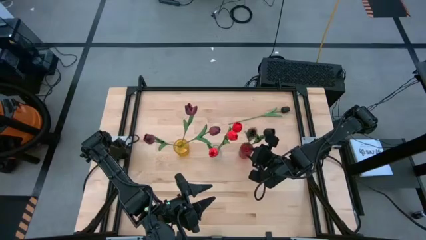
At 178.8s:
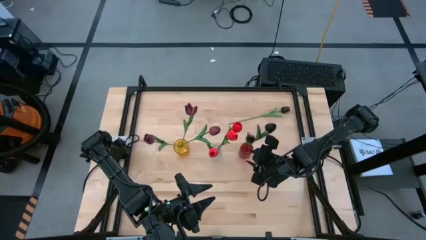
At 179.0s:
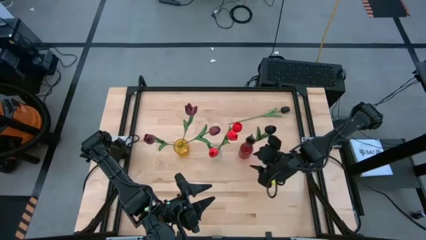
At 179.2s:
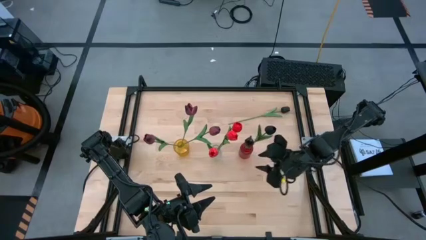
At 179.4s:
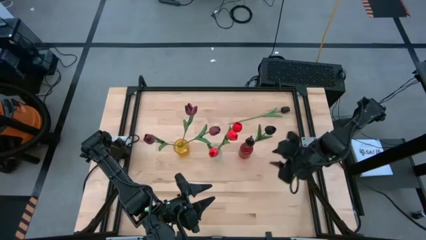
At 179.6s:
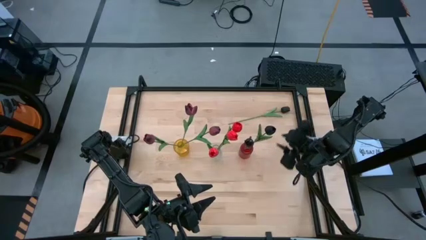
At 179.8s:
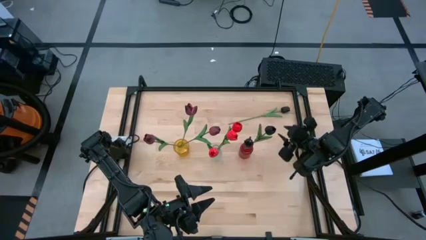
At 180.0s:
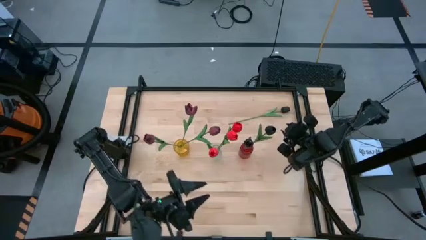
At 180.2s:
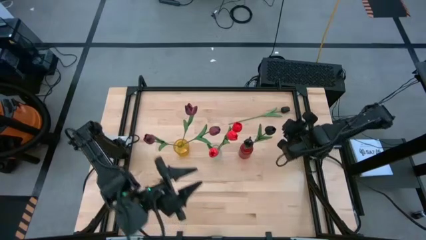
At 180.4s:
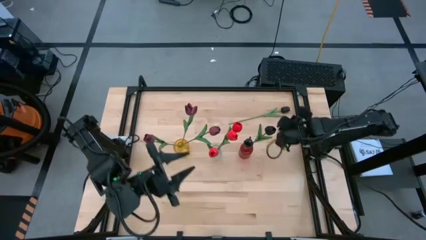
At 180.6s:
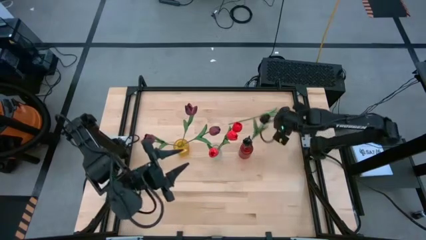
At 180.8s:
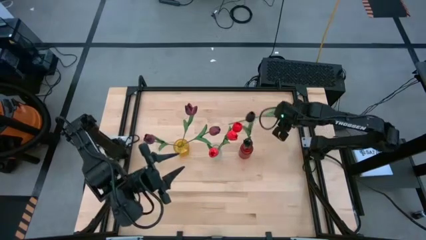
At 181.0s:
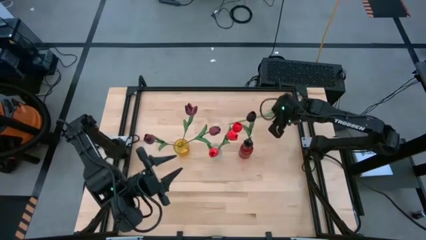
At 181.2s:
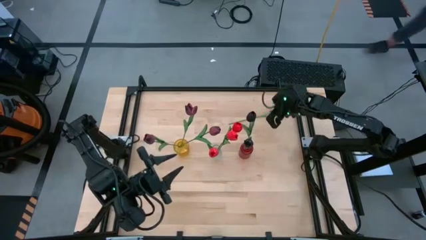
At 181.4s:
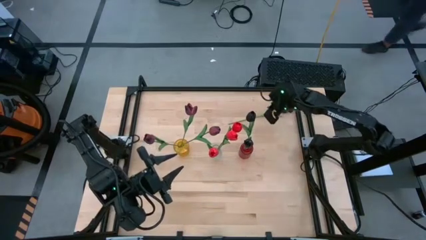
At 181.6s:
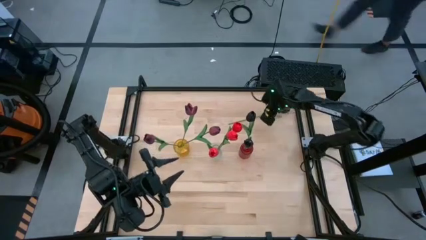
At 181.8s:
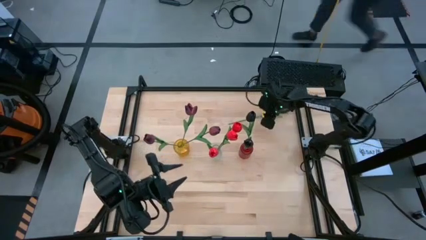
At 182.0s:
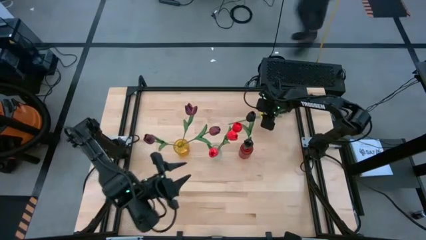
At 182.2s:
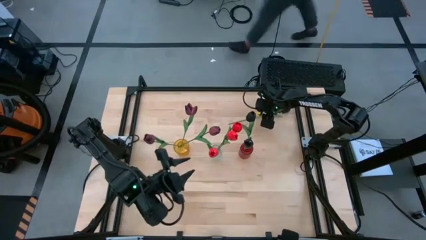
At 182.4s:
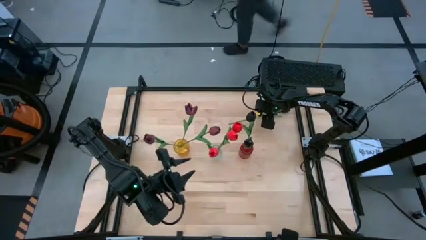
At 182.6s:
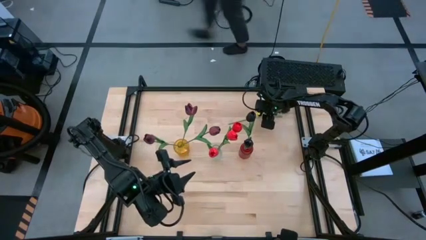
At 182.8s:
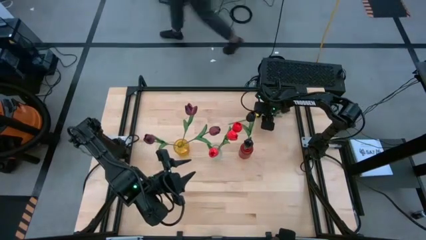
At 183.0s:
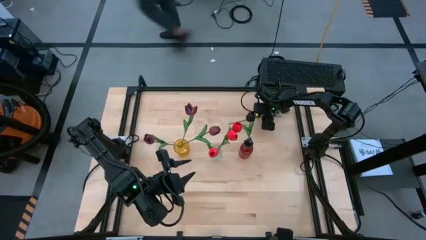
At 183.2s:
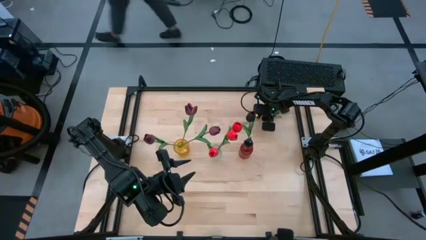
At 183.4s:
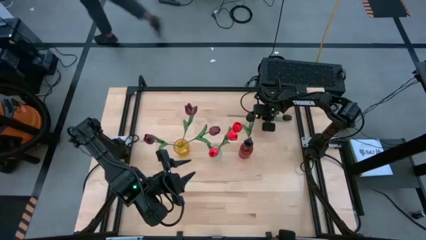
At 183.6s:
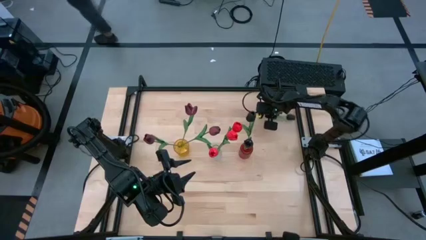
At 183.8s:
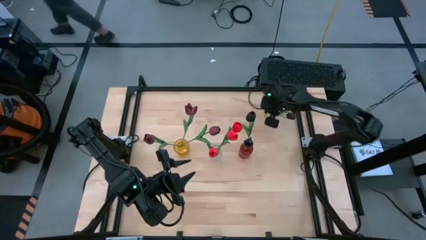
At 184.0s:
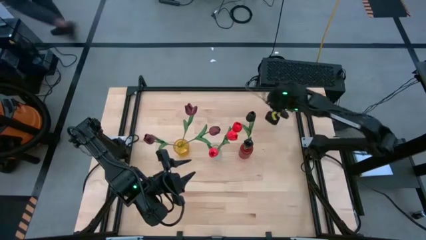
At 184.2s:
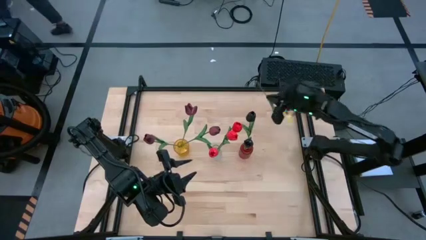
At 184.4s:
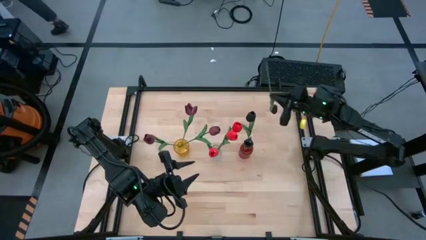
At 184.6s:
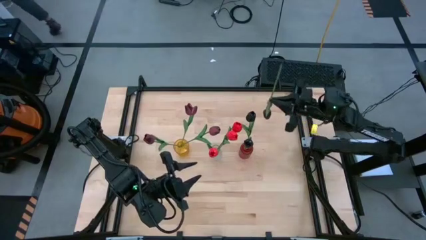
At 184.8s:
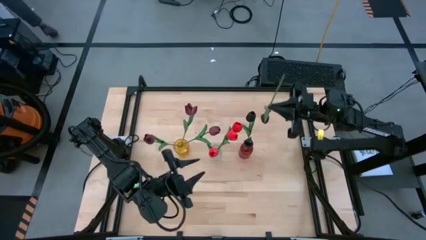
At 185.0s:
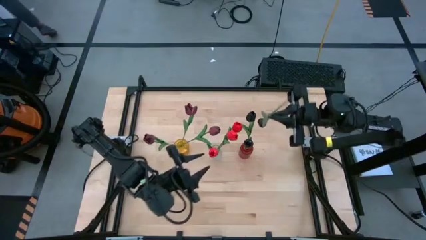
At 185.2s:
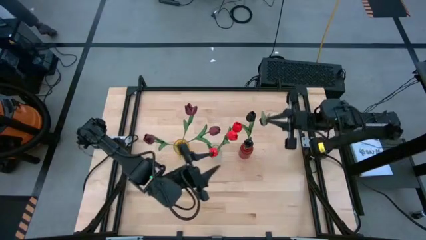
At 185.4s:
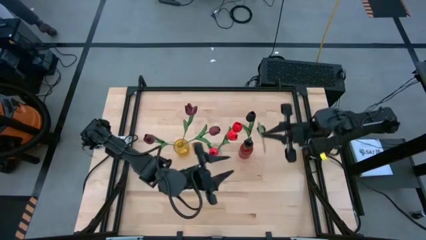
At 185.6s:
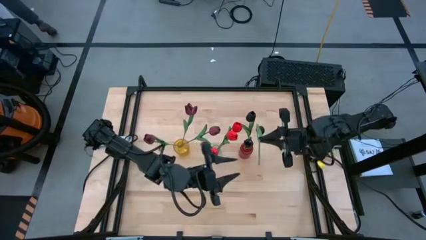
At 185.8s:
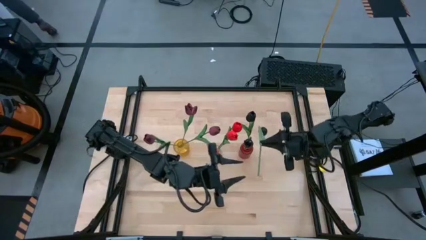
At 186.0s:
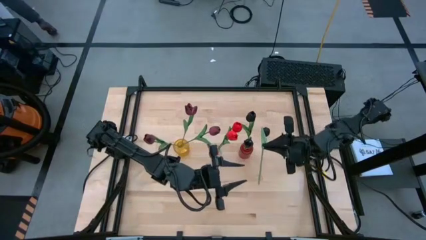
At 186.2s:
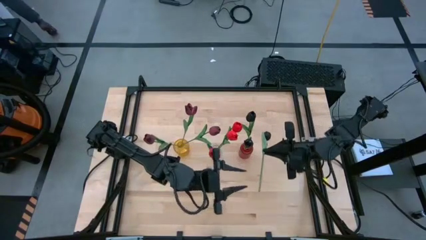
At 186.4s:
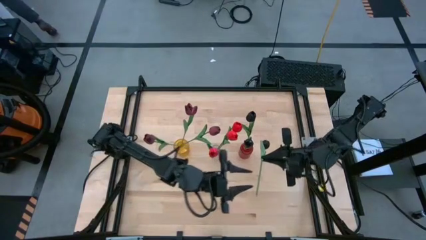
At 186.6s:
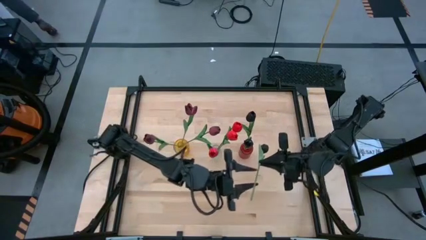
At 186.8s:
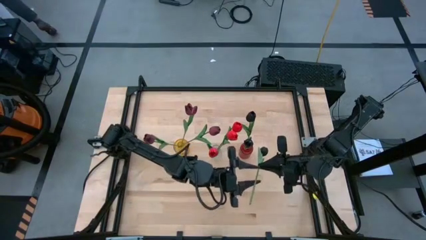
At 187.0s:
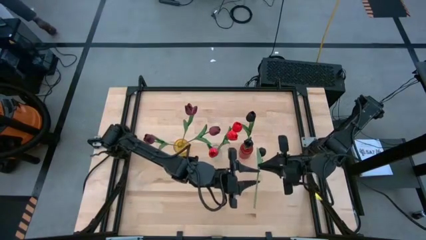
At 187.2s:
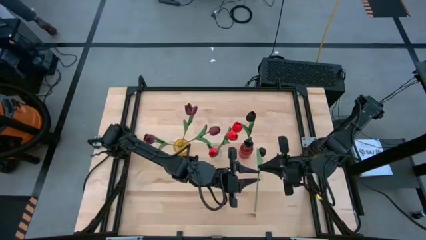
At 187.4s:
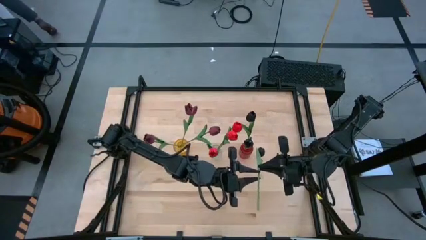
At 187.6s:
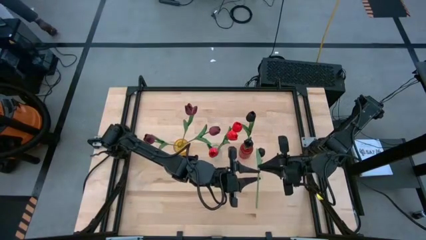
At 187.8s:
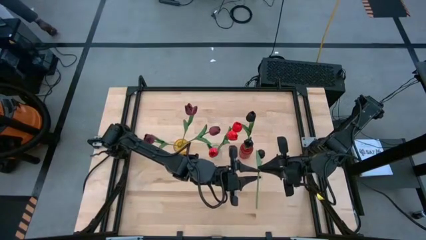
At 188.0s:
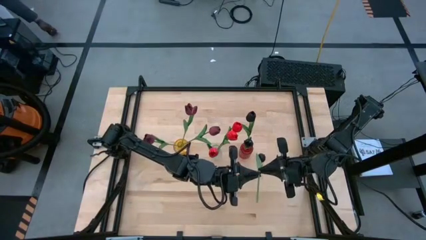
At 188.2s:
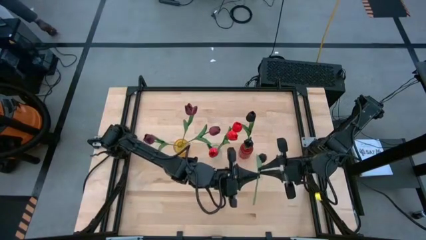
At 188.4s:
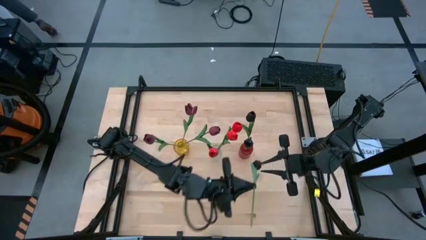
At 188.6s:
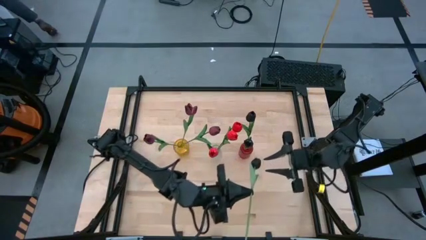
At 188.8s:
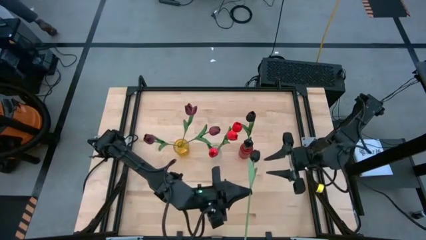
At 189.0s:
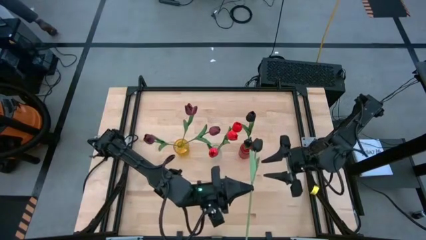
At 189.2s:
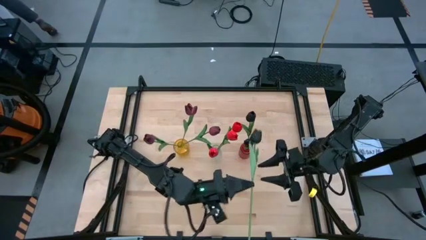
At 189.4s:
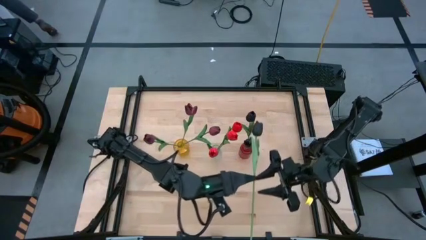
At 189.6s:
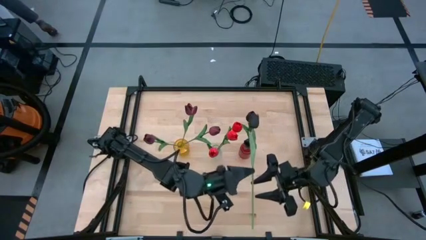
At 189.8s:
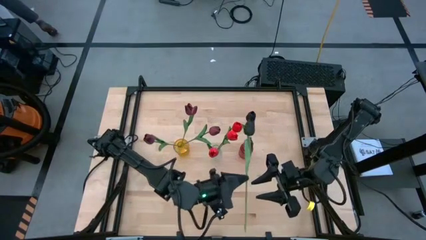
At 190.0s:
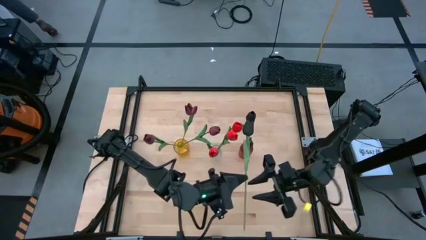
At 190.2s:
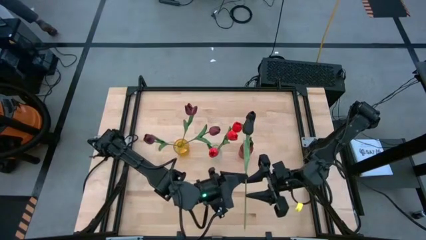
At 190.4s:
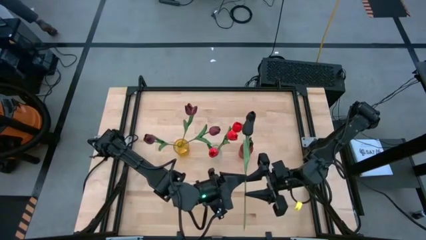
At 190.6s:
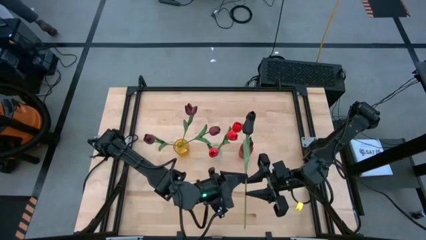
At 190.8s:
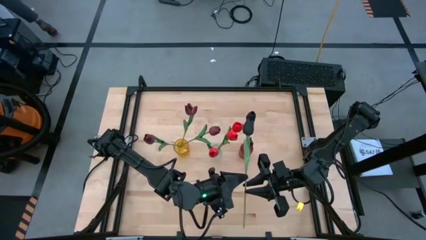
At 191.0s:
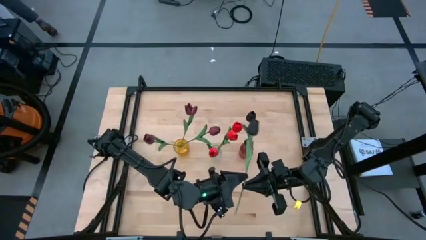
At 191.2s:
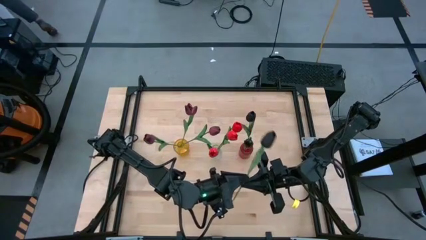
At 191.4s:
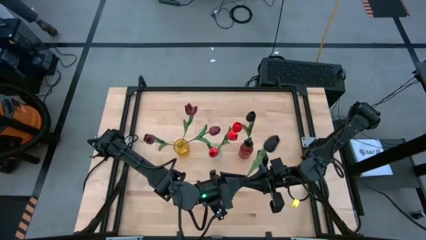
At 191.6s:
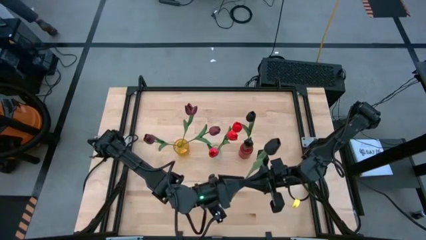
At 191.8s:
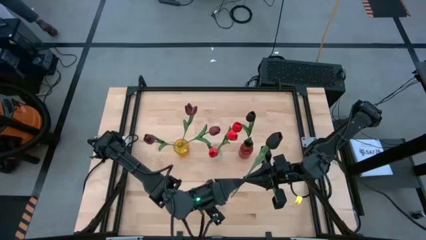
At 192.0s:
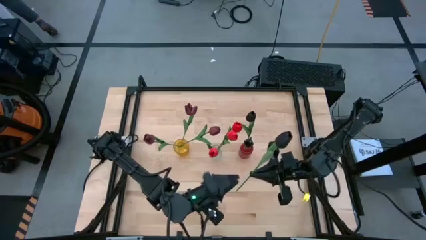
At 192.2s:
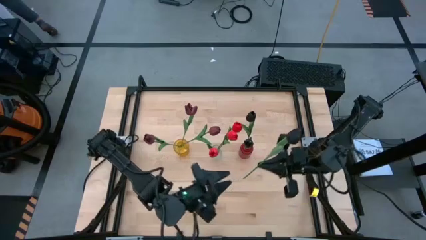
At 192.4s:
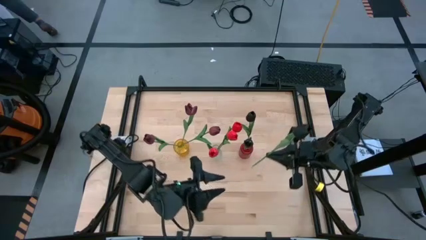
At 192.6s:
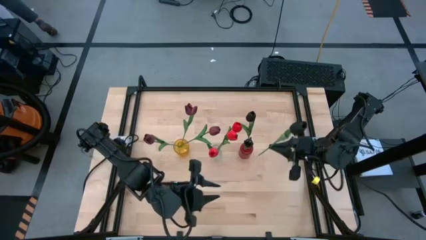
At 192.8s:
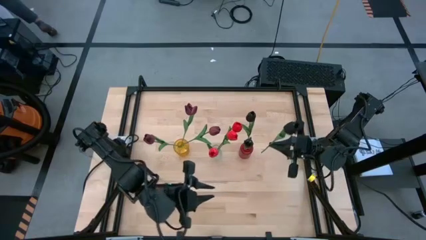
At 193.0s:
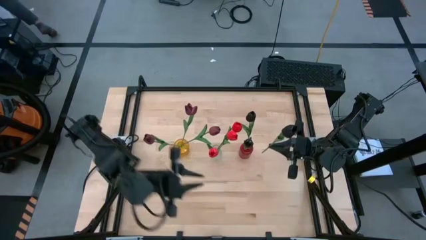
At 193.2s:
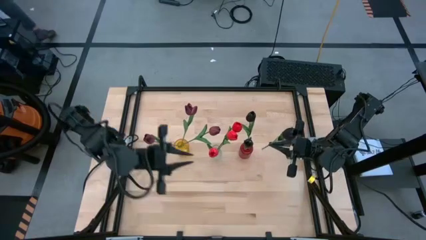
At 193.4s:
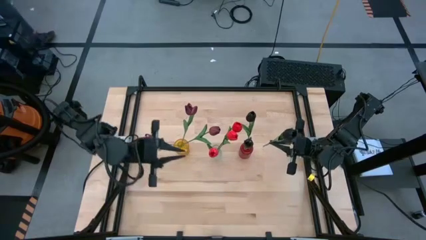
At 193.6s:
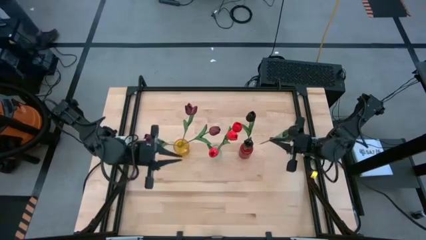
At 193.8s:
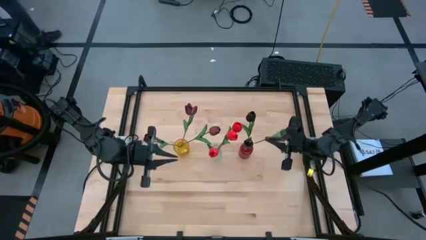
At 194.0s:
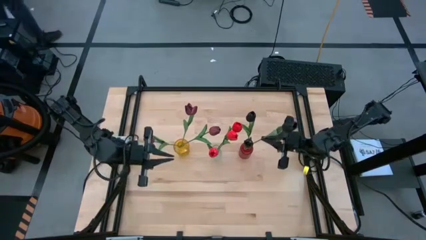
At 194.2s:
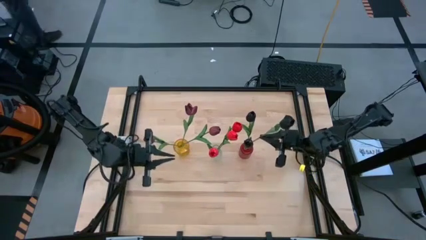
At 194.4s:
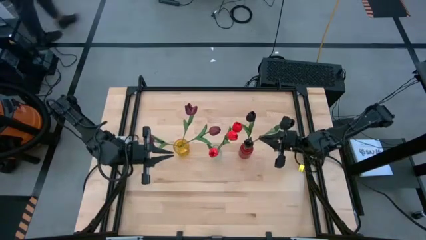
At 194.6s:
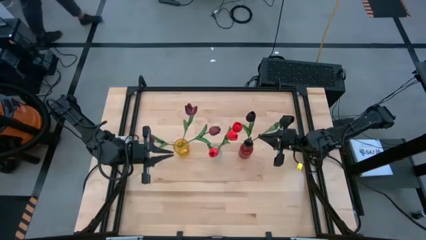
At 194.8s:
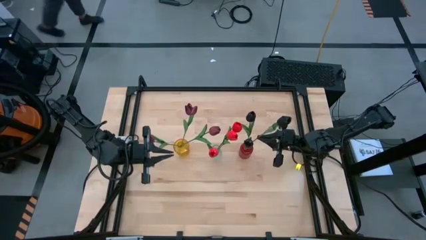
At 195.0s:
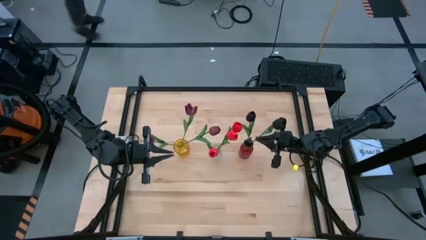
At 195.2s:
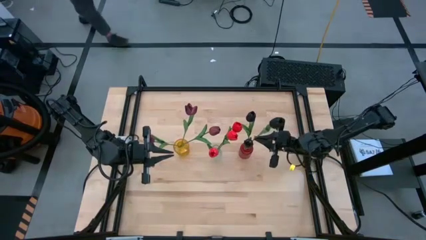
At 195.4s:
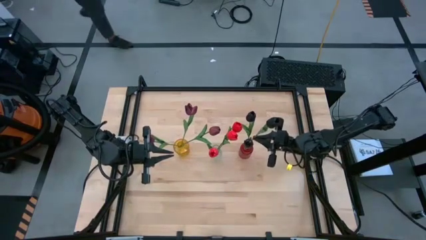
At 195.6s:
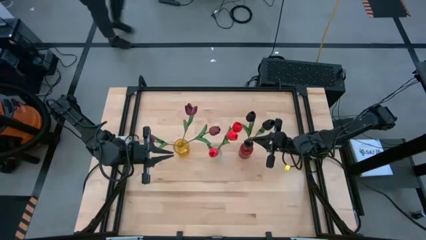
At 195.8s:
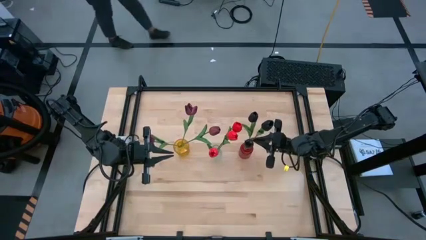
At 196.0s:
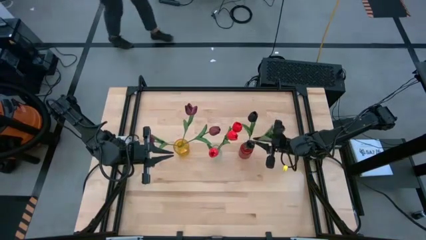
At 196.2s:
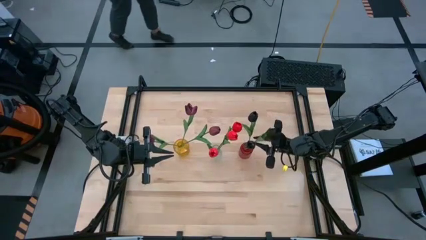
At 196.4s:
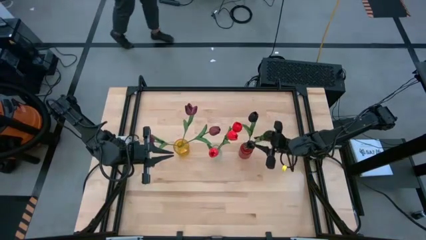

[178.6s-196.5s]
Task: Sort flowers into vase by color
Put the black tulip into the red vase
